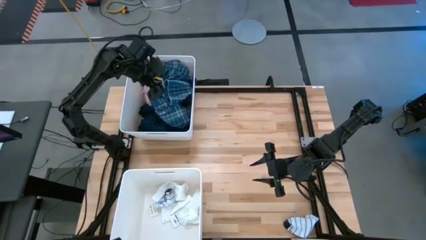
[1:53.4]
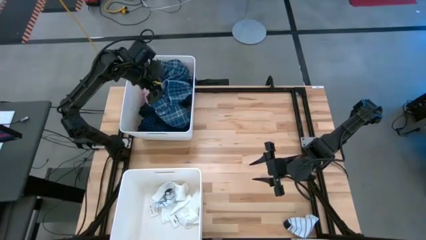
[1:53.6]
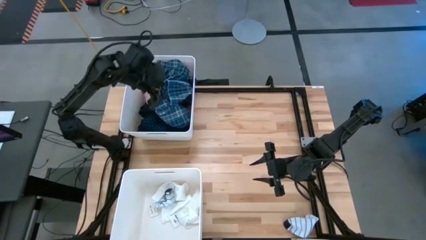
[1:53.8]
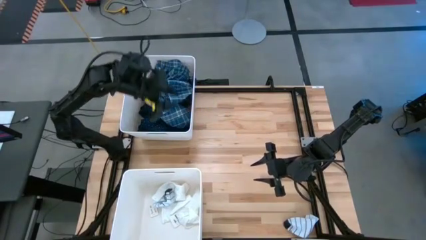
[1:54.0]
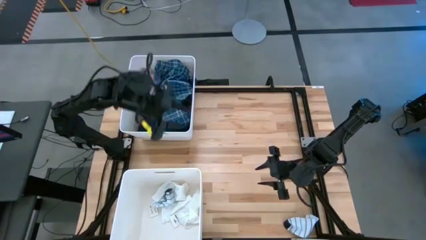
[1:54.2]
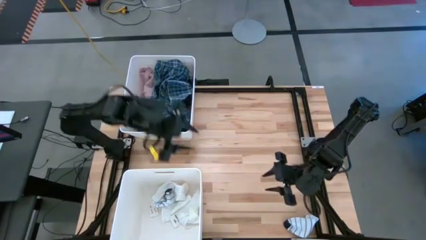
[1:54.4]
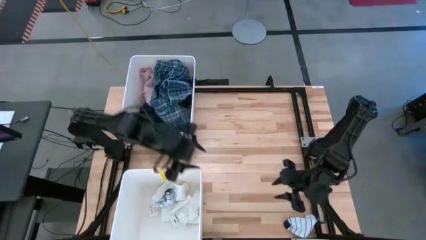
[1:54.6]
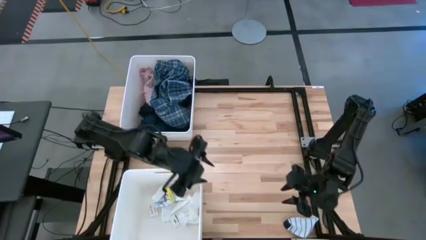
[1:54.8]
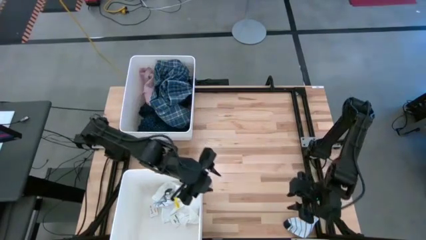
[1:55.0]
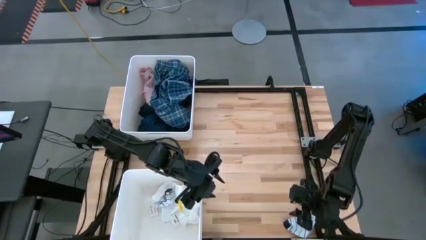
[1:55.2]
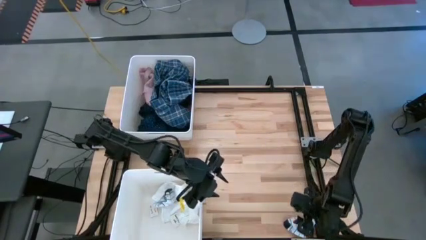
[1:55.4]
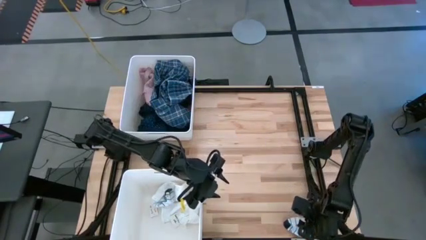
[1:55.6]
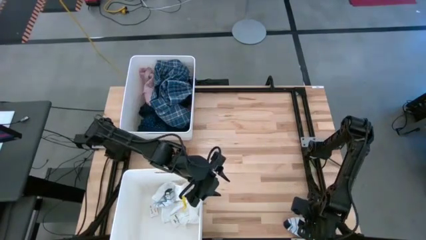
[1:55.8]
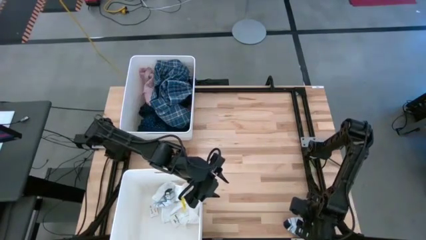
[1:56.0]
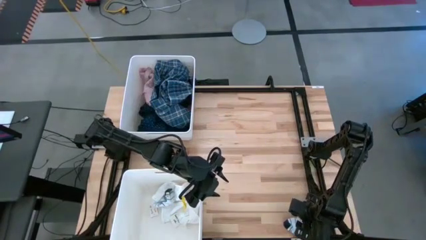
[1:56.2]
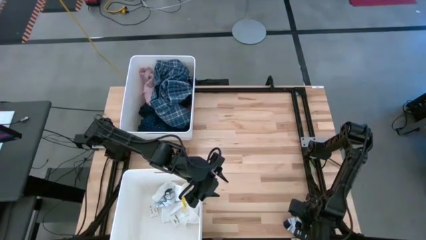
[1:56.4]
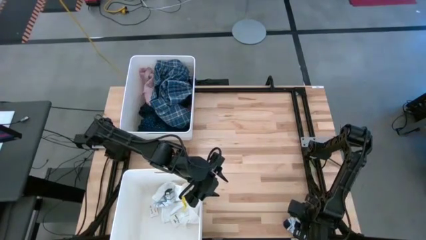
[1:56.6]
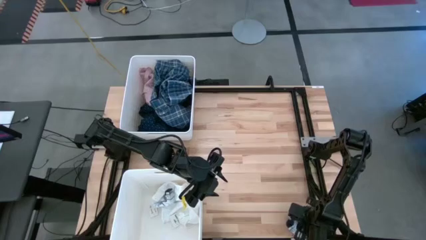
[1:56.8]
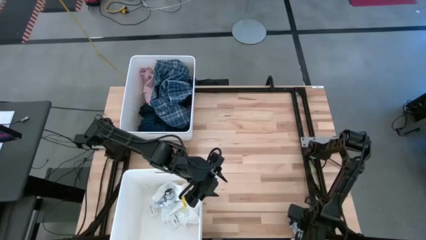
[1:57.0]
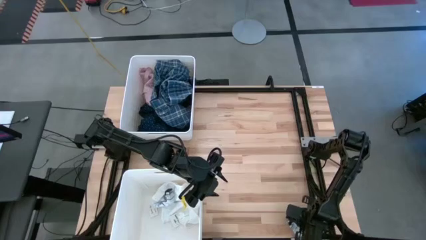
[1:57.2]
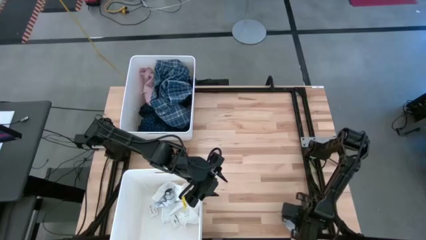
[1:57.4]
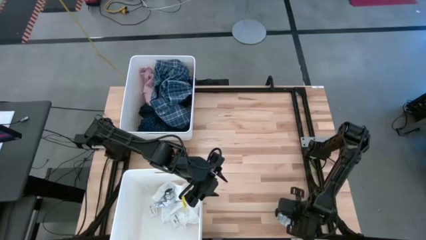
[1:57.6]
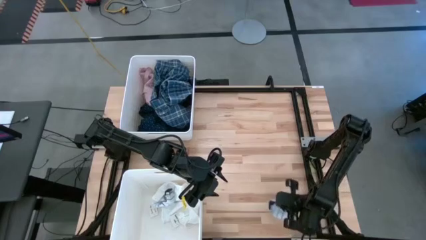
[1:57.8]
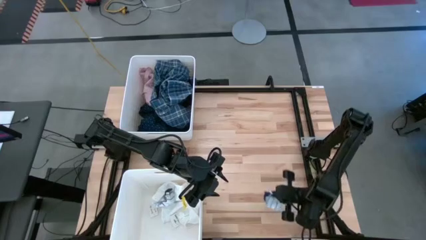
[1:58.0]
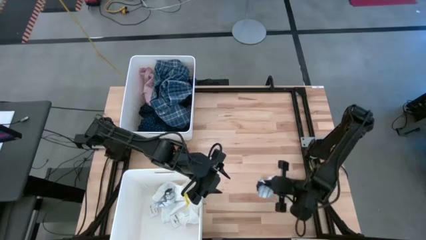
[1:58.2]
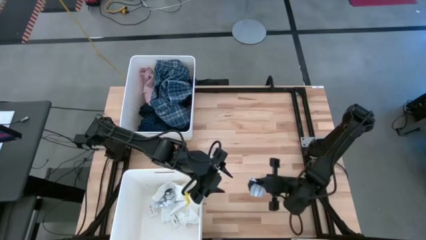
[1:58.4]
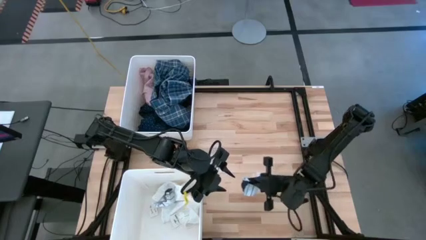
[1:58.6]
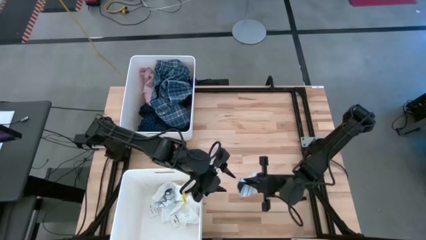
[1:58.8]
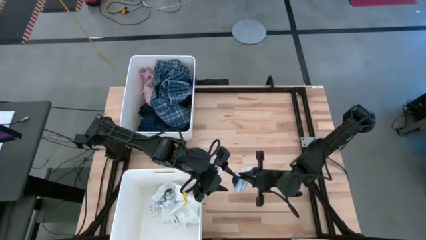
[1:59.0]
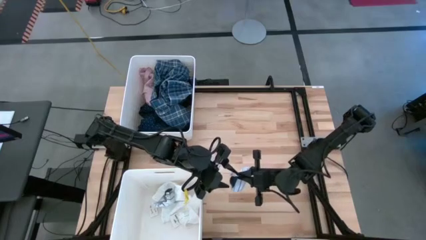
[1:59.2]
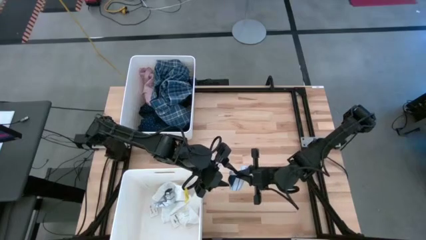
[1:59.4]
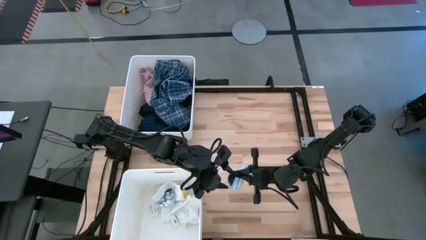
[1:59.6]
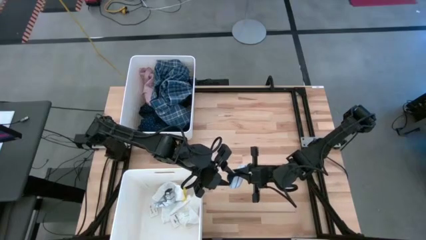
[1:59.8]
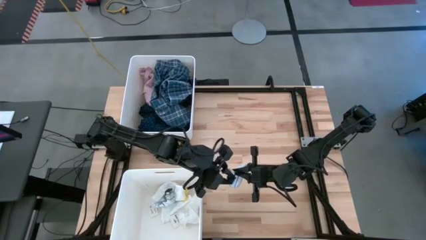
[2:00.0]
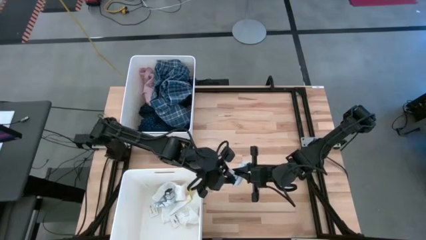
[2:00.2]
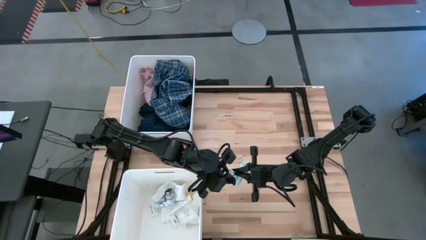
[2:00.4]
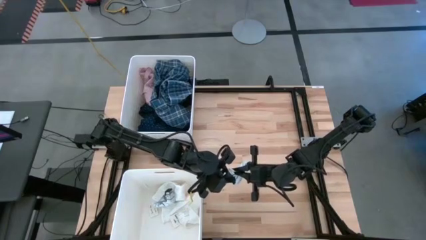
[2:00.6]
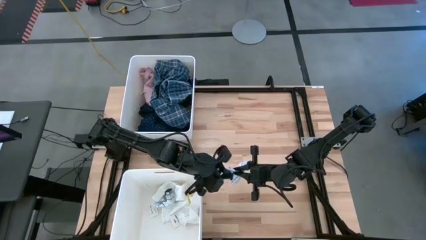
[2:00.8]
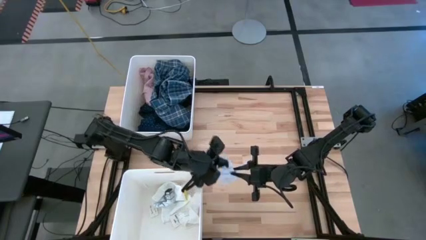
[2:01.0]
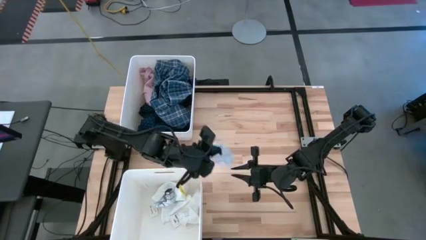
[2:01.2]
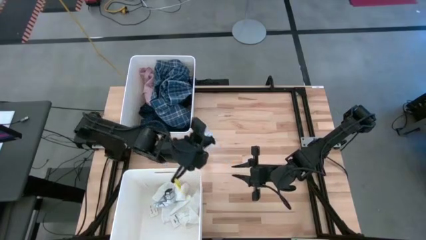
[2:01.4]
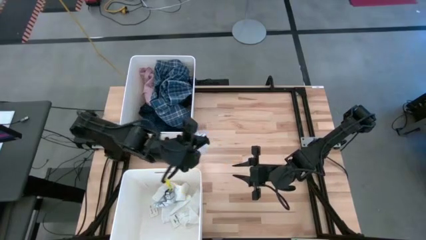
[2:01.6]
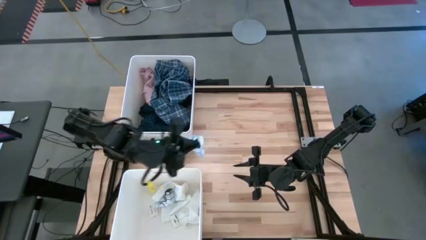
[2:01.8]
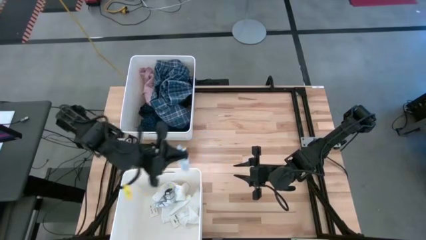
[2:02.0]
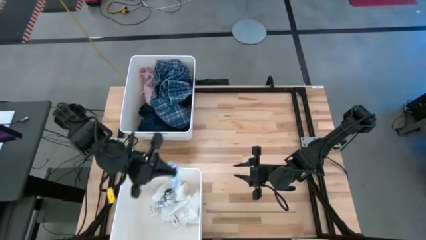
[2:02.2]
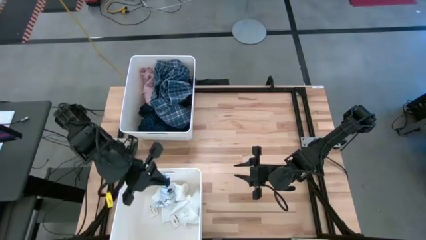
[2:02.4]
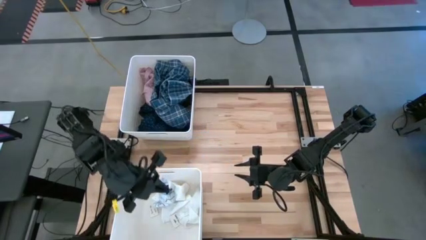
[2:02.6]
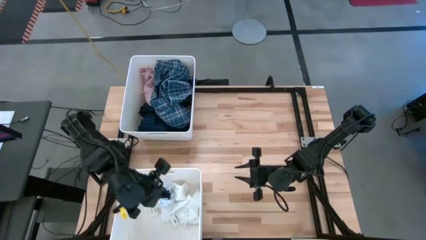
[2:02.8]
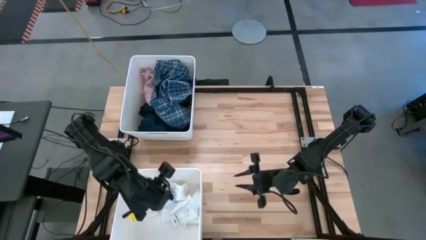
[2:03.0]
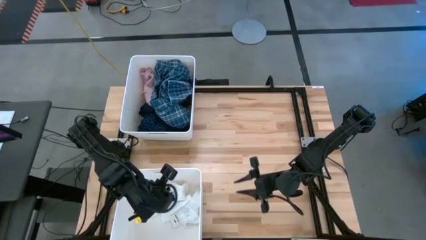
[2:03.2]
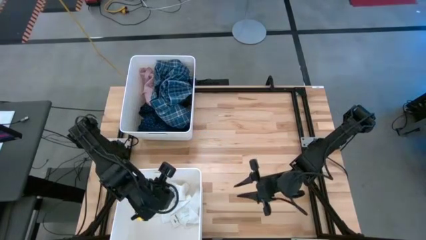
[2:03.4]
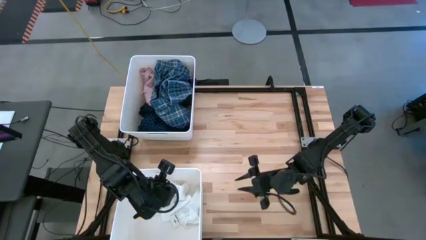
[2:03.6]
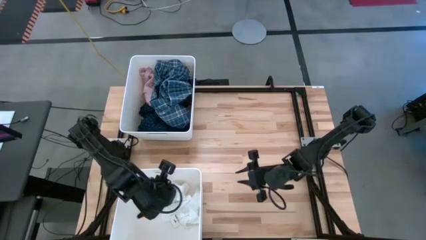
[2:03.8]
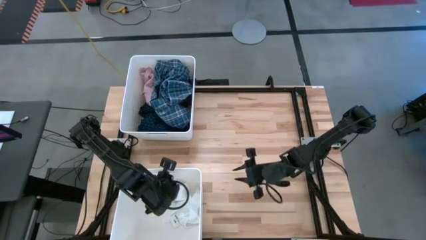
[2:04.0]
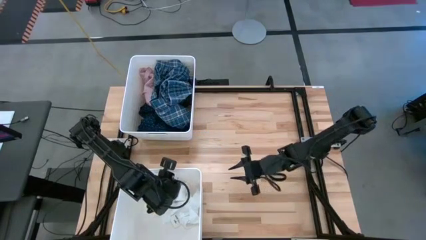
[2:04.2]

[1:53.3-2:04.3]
Task: Sort clothes
Put the white striped sock into the bottom white bin

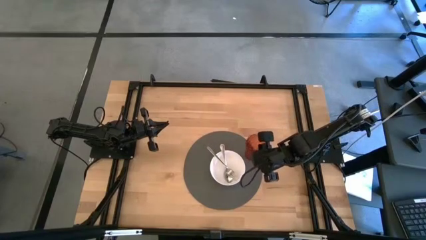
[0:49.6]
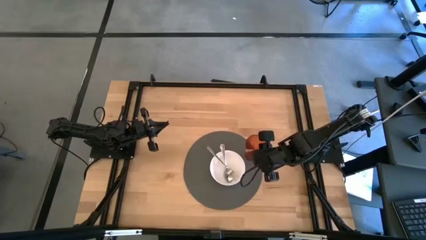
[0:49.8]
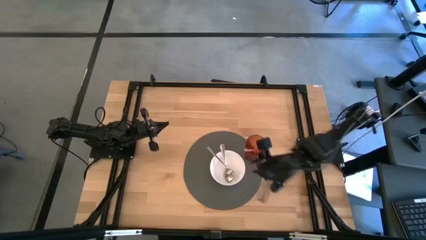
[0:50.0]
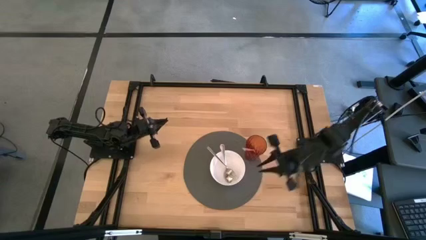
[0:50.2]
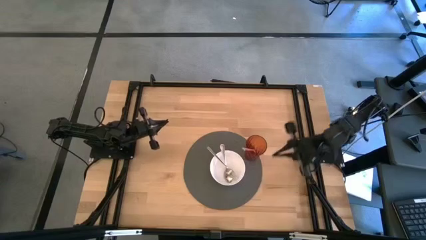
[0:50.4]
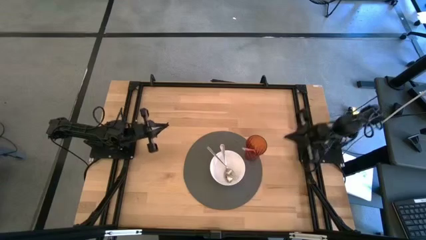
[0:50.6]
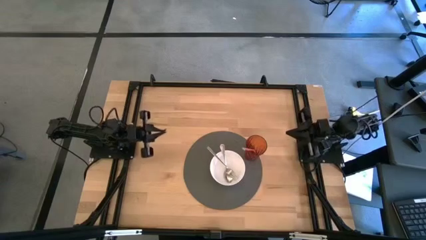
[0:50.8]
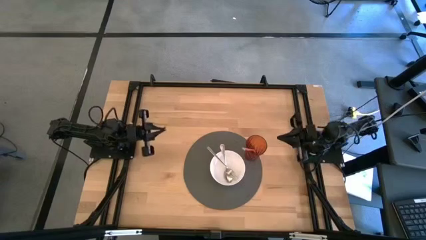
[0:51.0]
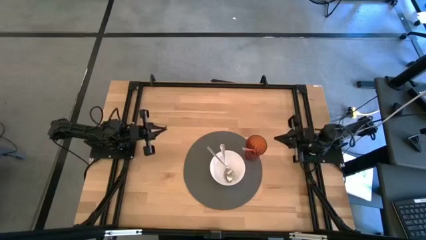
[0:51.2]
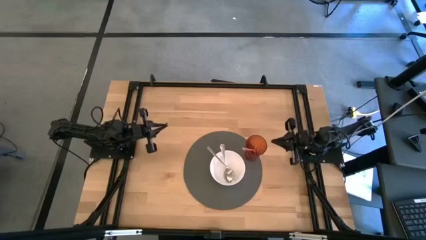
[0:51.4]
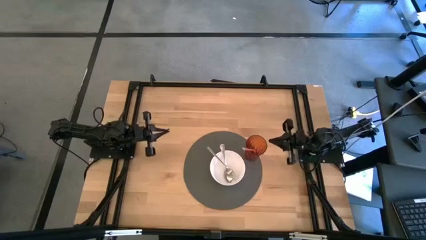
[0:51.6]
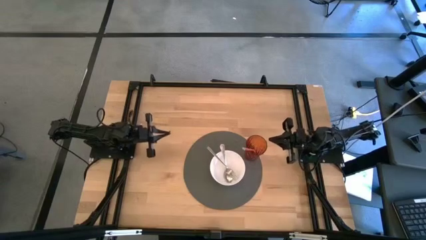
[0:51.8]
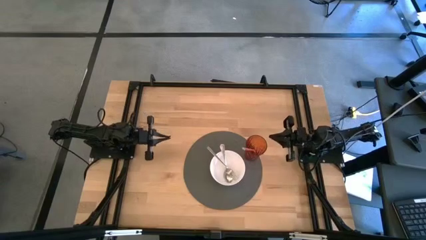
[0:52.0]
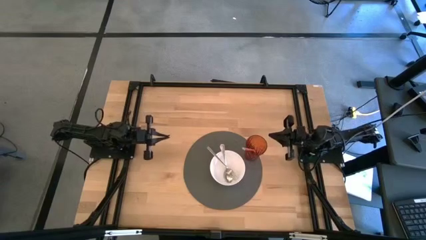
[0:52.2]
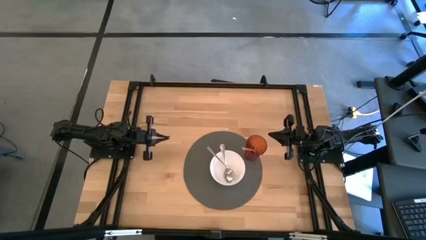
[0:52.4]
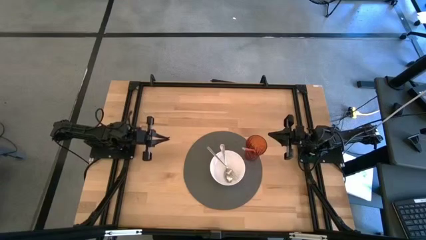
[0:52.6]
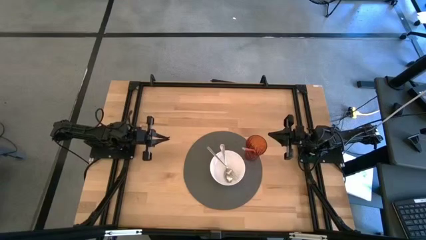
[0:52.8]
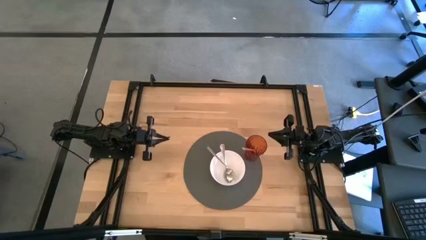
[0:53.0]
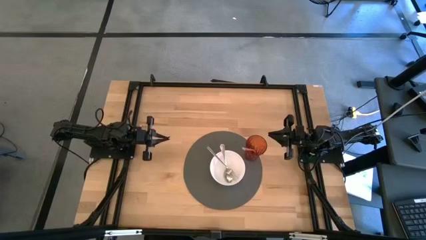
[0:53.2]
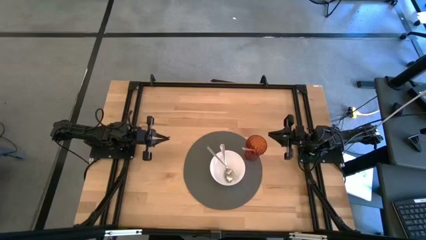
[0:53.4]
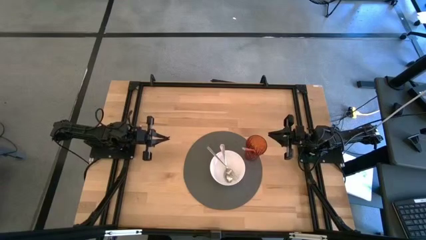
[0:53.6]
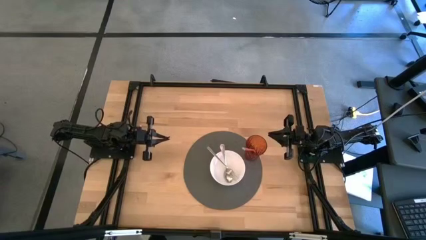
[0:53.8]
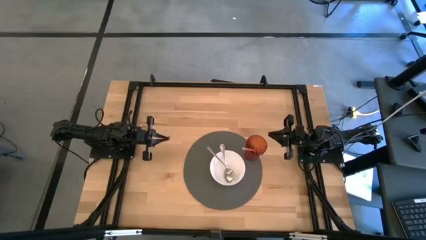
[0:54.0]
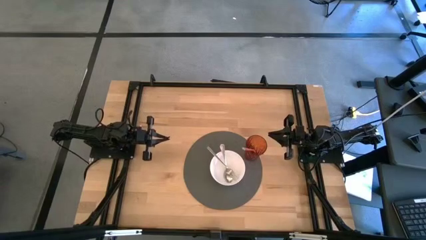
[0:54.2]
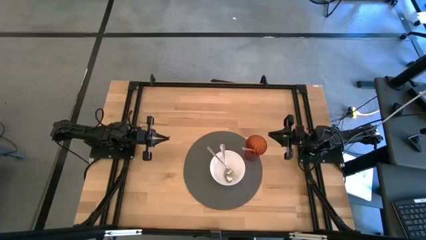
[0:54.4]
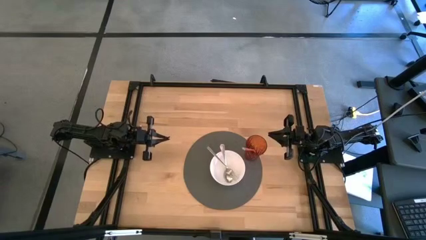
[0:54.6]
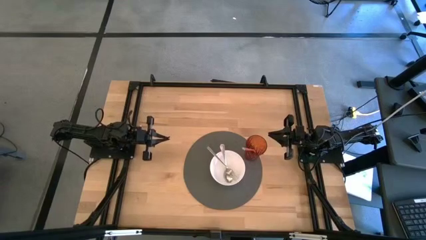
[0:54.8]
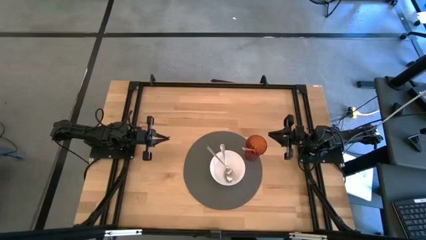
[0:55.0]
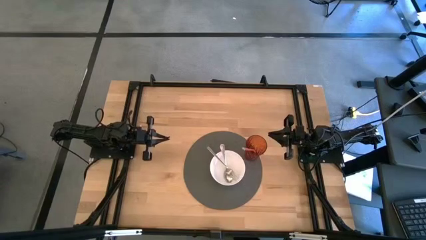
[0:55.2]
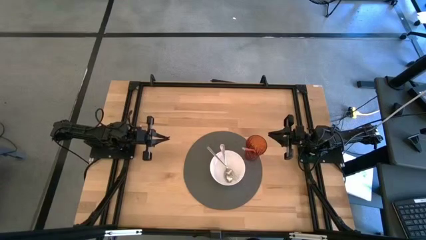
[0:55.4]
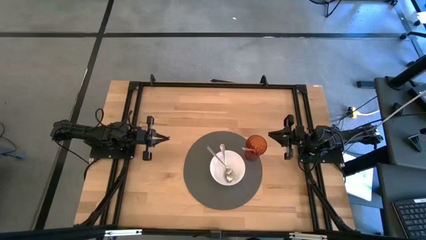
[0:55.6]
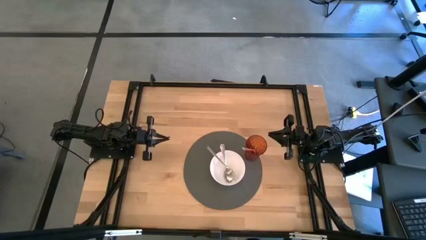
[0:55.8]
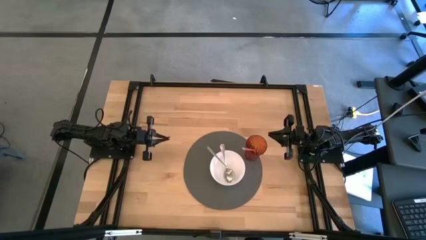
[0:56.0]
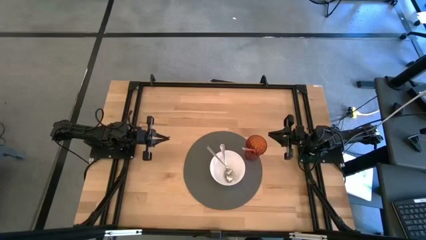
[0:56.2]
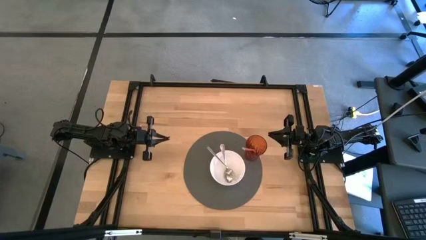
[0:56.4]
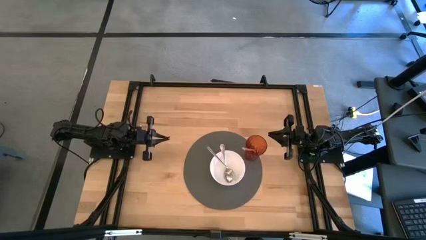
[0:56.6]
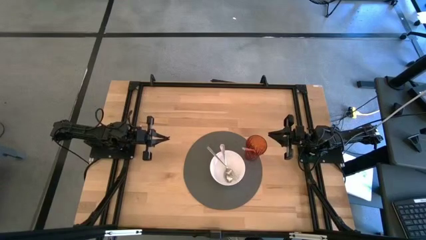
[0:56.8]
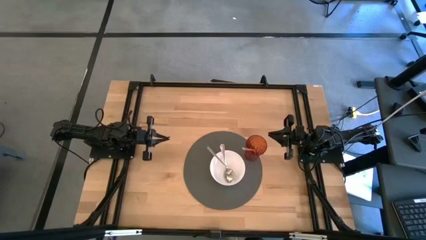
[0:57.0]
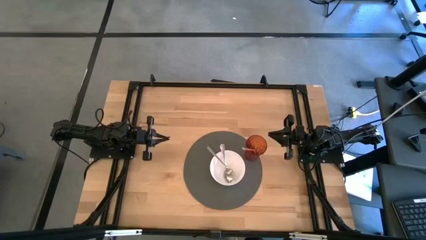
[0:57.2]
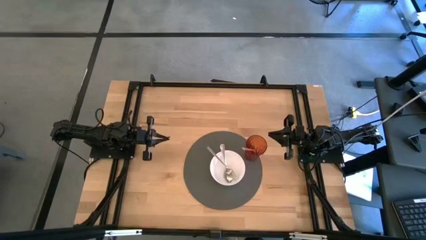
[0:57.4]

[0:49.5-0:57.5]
Task: Pick & Place Utensil
Return to Home Position
